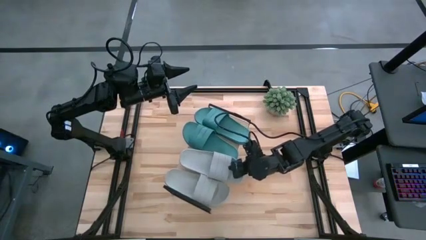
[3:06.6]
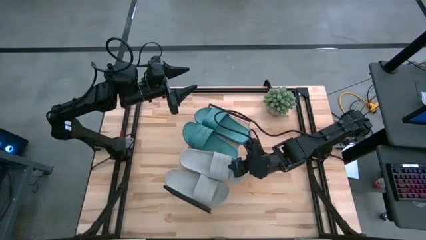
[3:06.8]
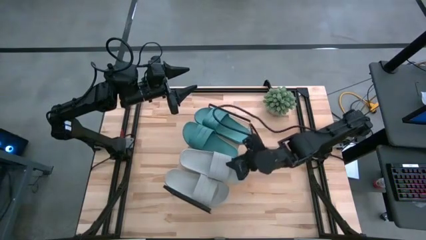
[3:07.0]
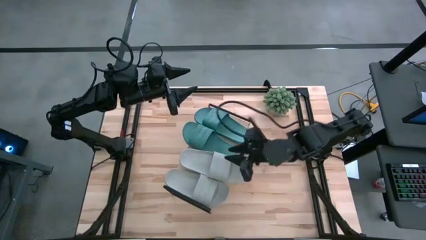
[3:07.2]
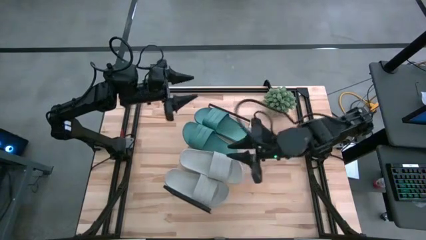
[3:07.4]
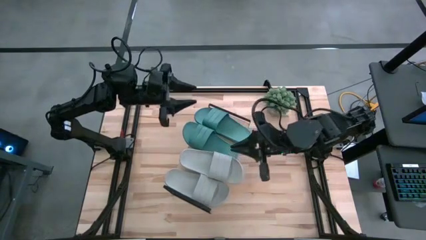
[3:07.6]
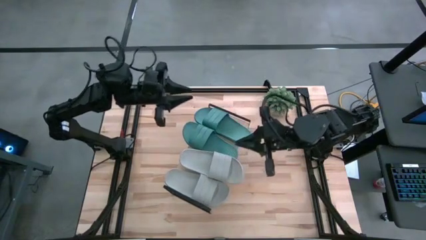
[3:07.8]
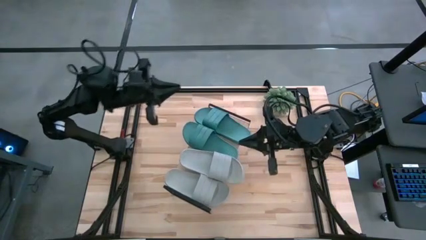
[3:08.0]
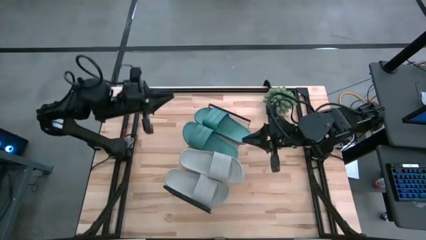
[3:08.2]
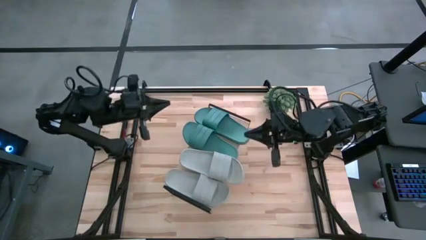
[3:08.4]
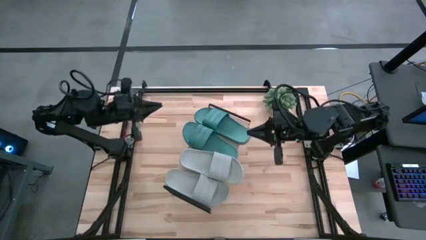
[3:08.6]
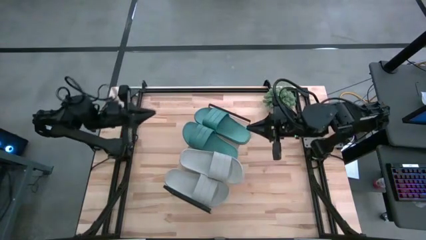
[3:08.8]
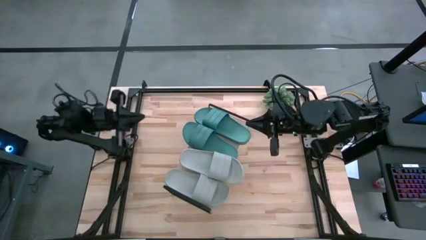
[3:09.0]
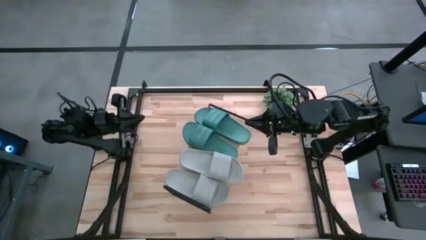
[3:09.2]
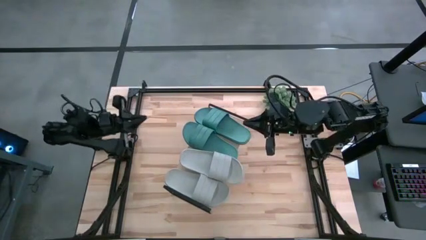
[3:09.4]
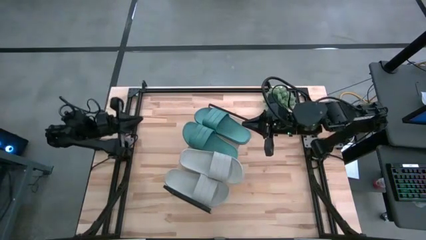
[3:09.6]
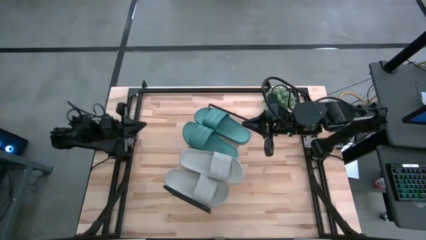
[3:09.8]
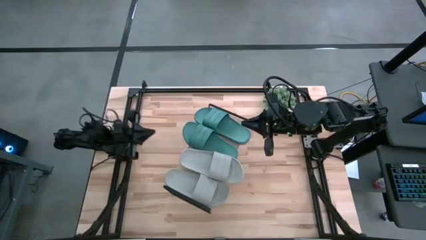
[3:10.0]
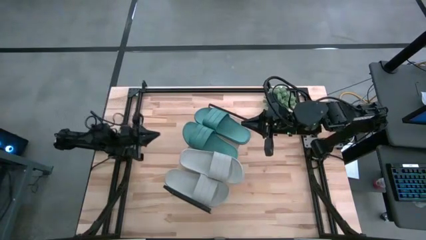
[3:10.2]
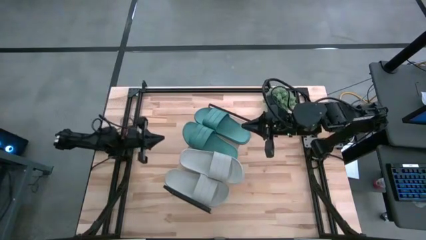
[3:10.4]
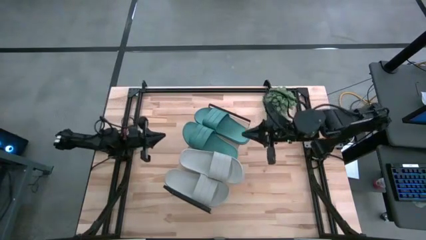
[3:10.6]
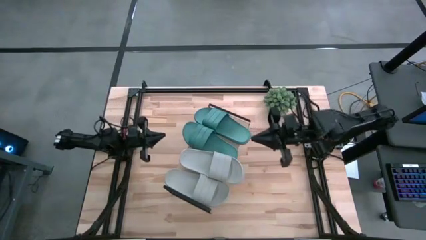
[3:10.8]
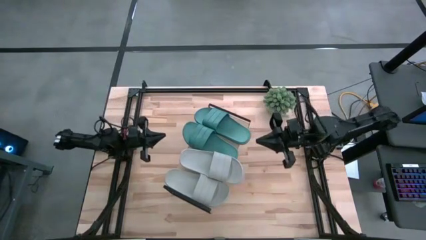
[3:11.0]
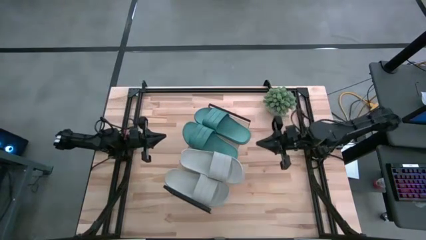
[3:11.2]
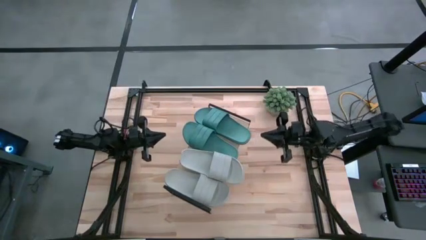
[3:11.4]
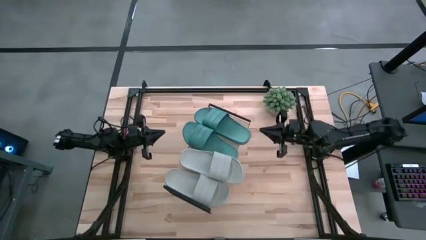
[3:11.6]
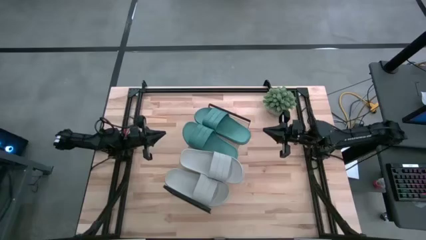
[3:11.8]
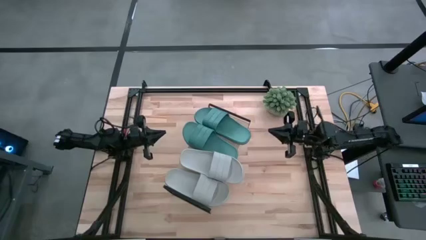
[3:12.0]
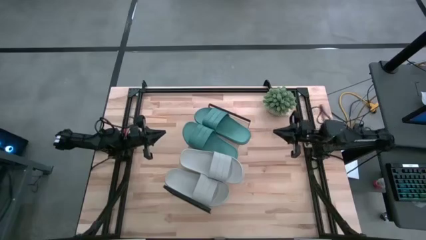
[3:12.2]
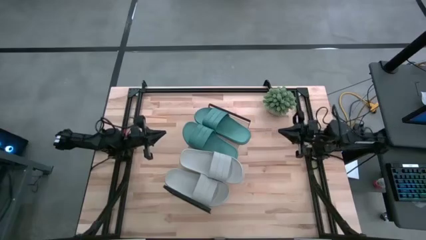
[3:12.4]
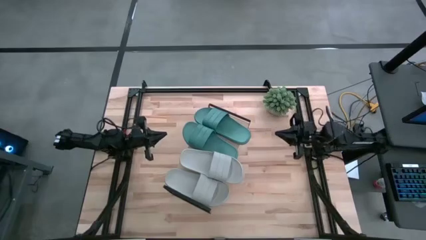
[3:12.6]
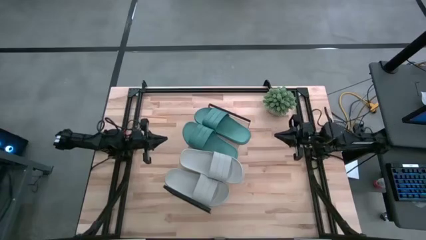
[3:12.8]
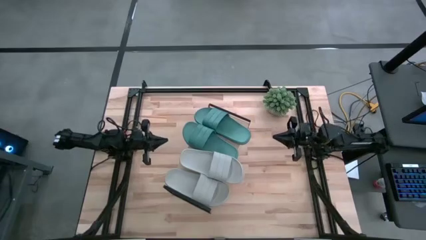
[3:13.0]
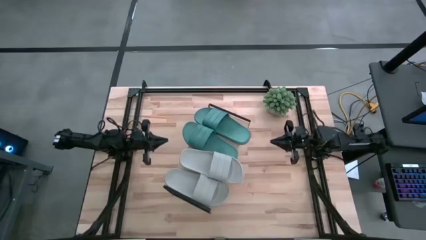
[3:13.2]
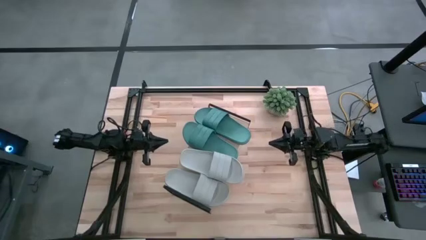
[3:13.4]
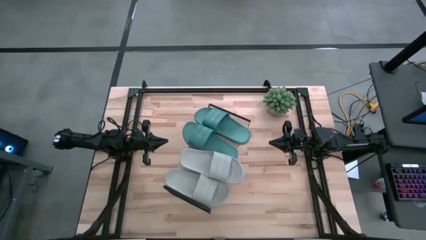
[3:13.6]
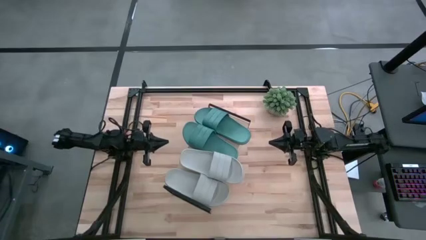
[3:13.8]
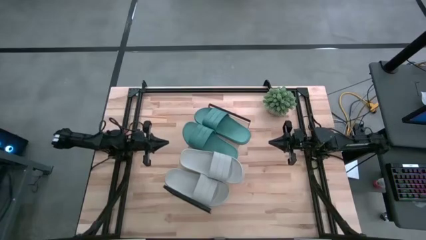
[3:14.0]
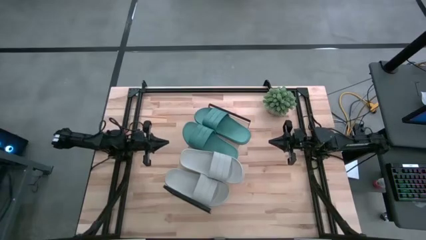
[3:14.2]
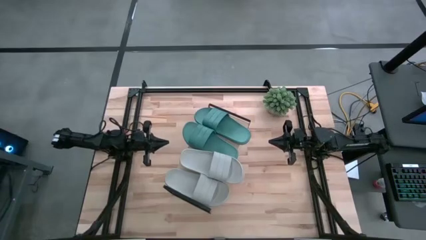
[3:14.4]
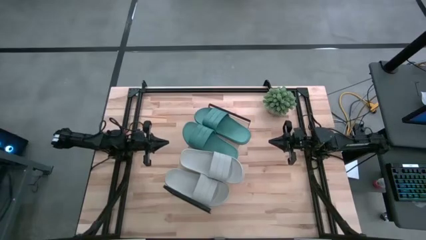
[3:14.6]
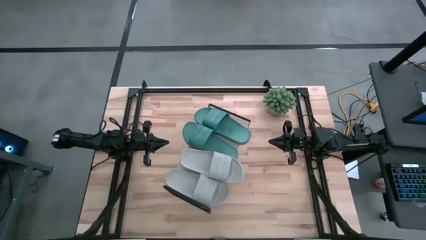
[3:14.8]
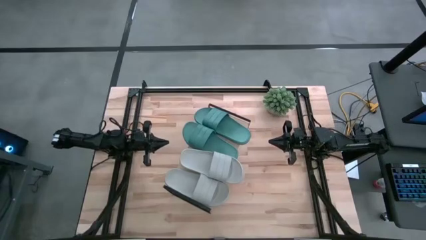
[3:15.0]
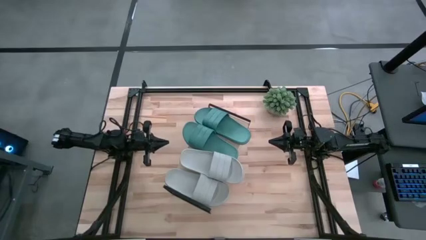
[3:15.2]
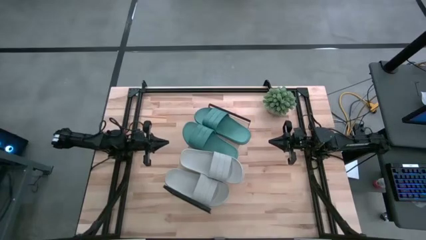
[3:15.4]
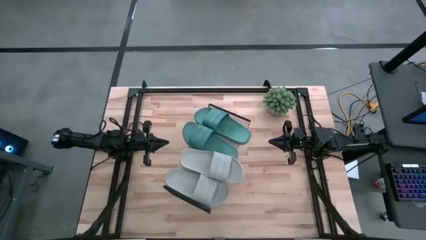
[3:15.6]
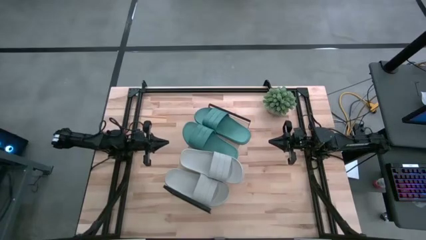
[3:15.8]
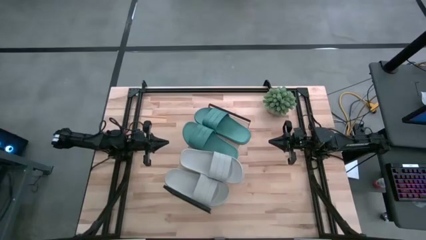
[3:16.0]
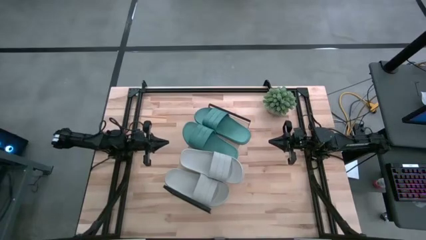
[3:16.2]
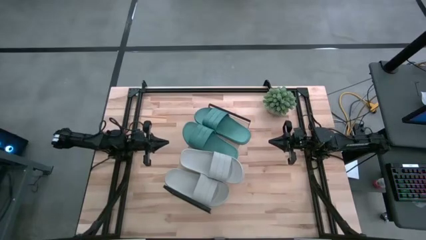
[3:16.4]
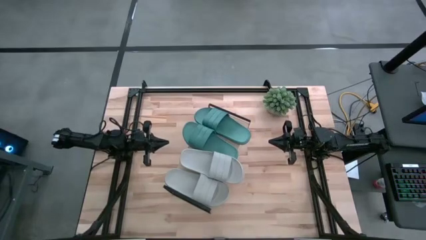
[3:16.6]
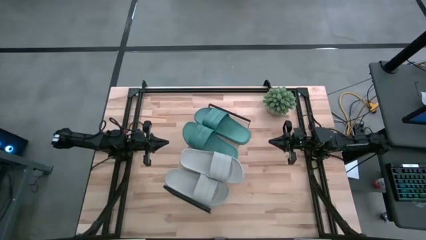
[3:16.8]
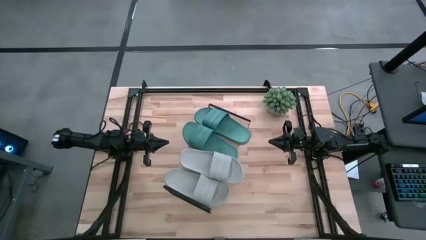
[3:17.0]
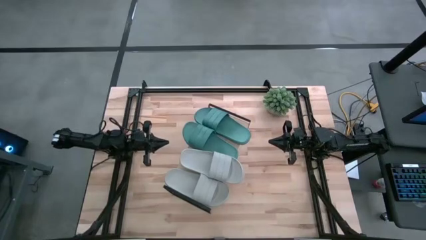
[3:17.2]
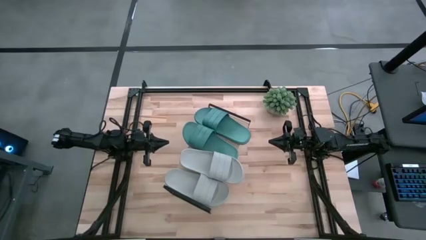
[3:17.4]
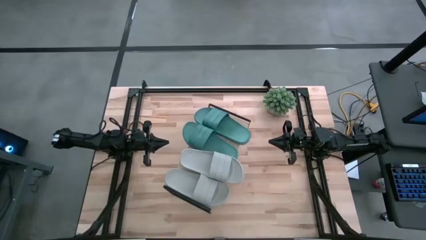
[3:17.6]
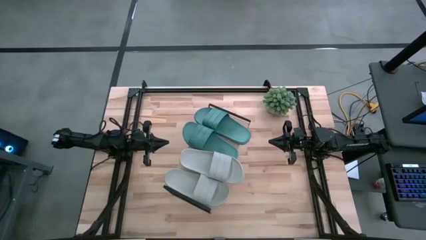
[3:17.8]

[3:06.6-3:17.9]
Task: Pick and place slides into the shelf
Return to Home Position

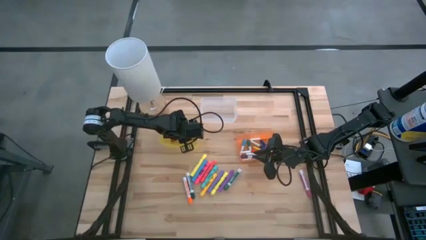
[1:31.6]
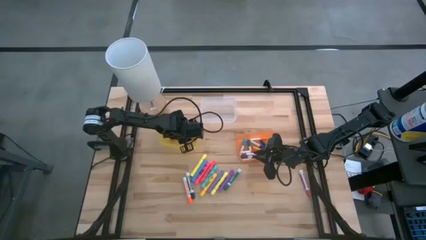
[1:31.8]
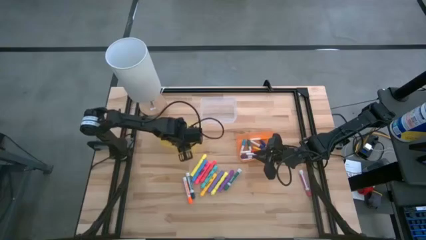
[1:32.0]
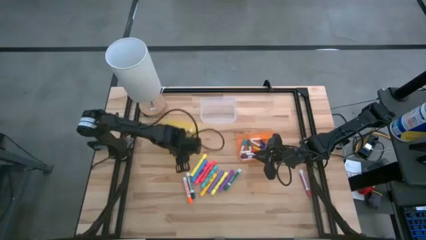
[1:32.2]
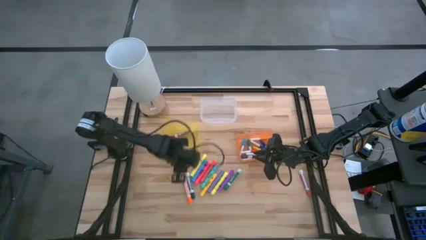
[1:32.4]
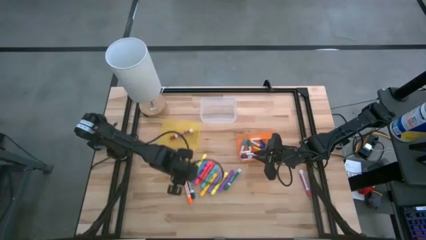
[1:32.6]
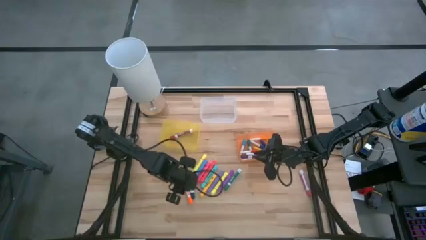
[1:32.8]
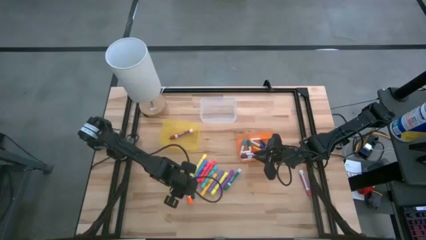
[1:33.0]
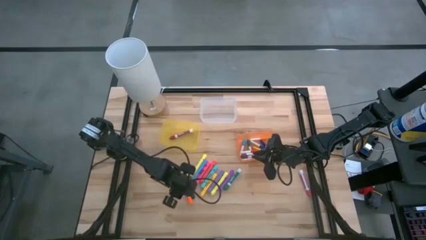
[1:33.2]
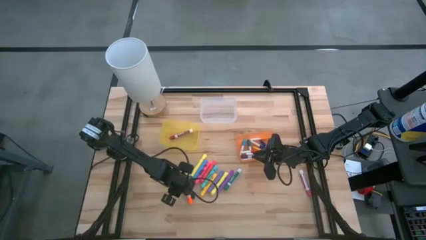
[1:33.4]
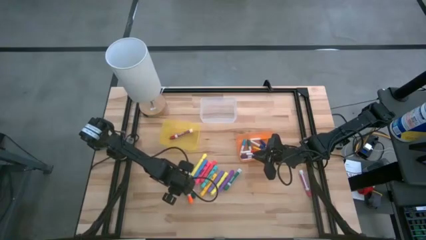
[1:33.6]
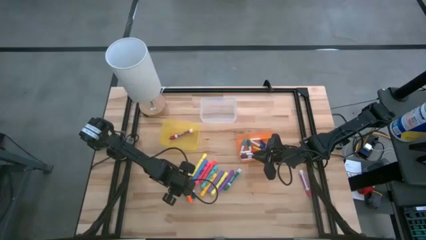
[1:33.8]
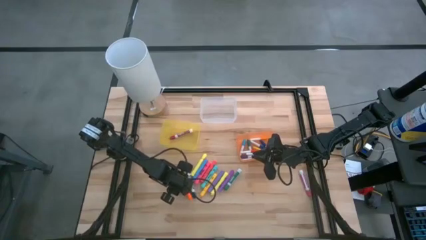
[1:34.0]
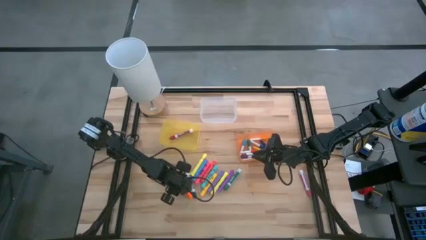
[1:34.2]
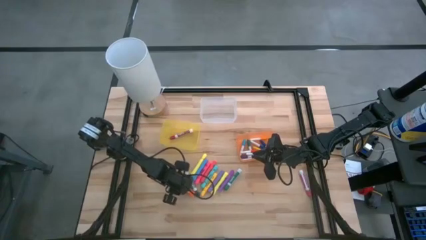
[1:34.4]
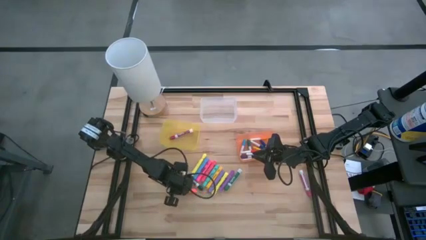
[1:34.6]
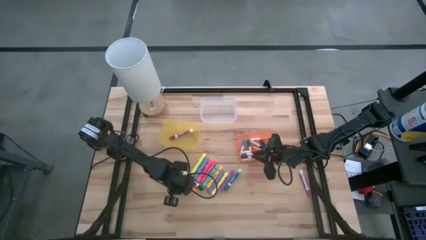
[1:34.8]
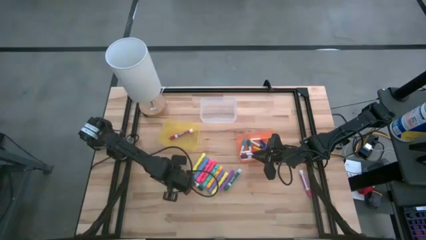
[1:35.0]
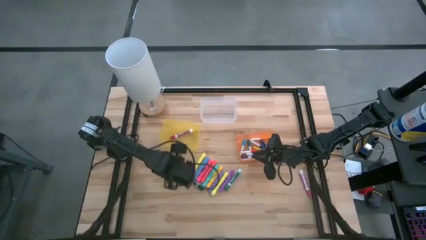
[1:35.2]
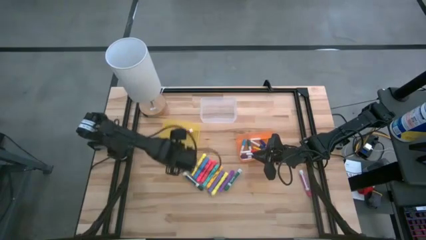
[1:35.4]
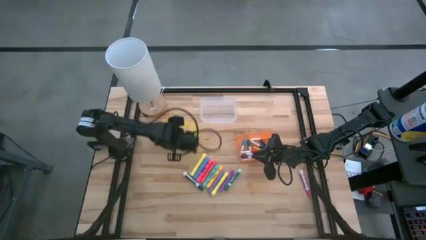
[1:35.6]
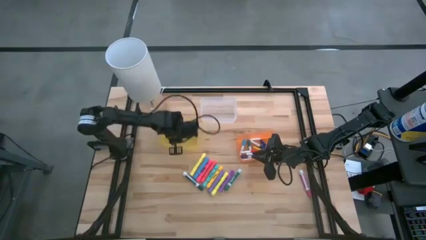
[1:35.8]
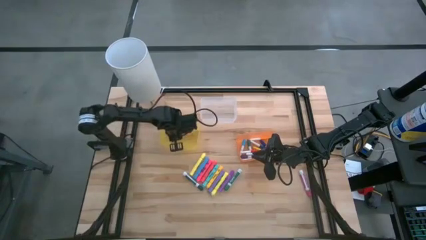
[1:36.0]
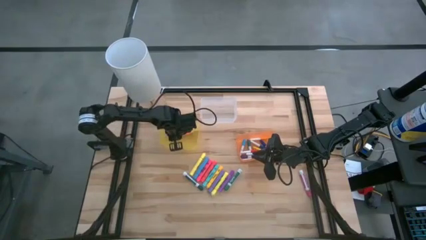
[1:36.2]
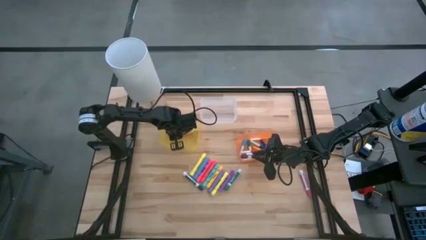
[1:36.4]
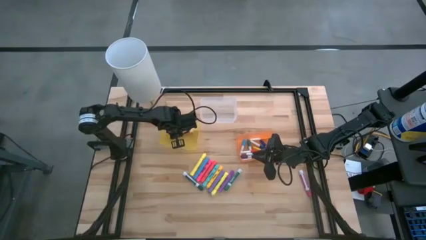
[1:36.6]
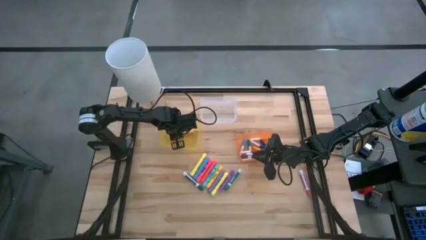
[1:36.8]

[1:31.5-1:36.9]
Task: Pick & Place Markers
Put the orange marker pen into the transparent yellow bin
